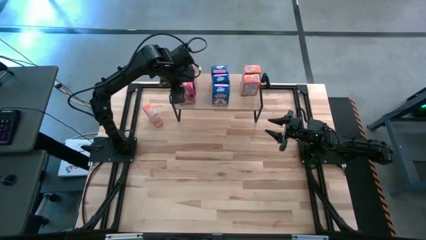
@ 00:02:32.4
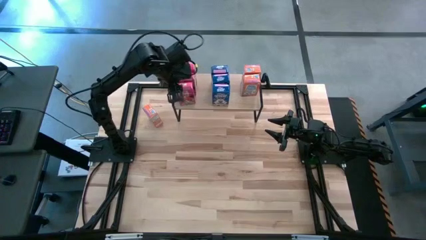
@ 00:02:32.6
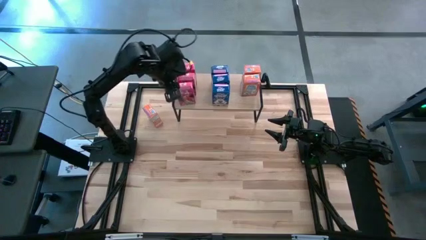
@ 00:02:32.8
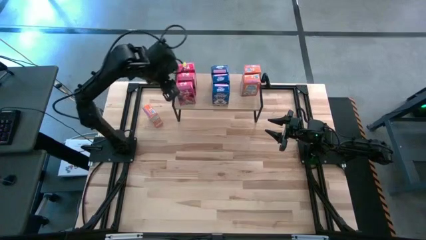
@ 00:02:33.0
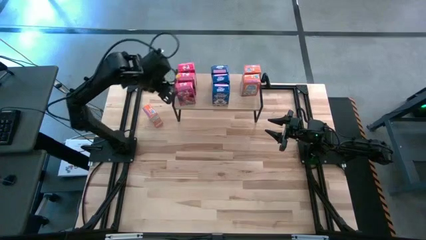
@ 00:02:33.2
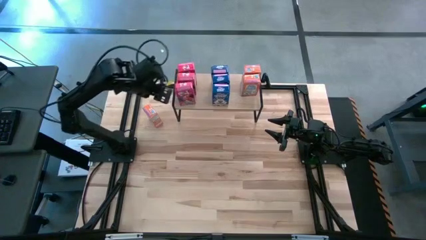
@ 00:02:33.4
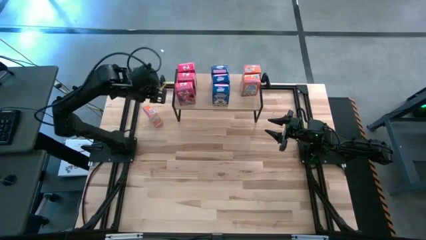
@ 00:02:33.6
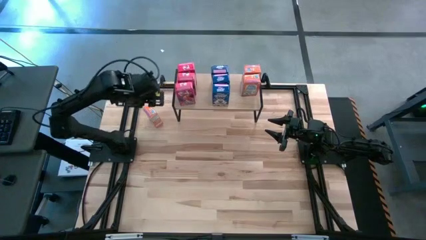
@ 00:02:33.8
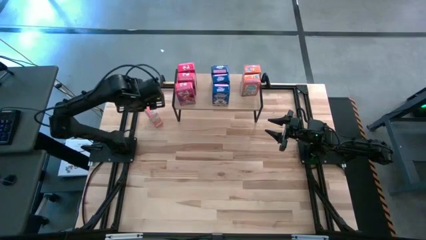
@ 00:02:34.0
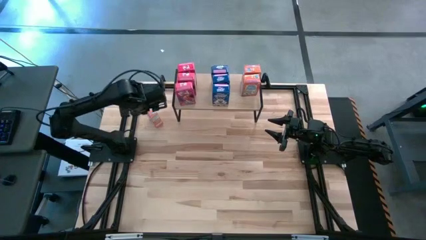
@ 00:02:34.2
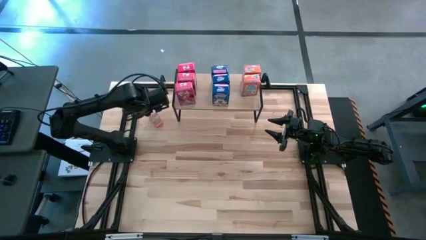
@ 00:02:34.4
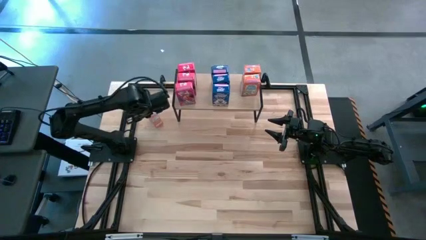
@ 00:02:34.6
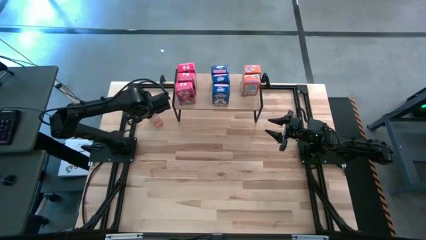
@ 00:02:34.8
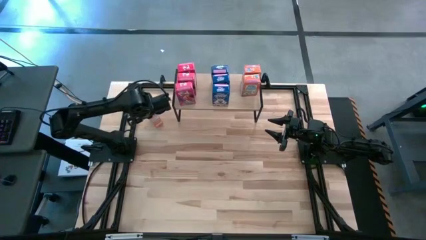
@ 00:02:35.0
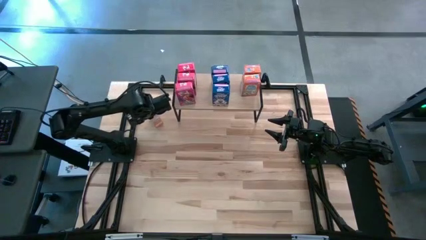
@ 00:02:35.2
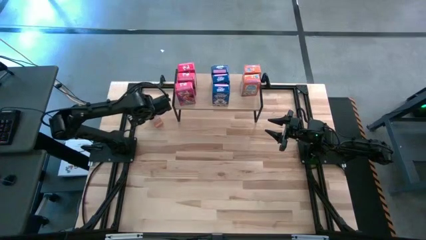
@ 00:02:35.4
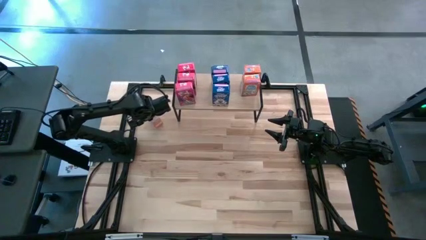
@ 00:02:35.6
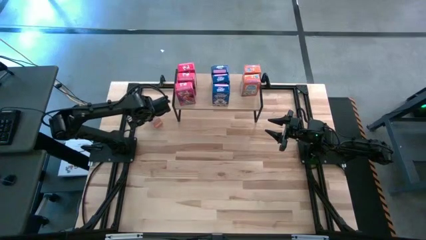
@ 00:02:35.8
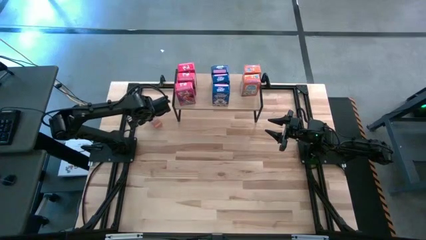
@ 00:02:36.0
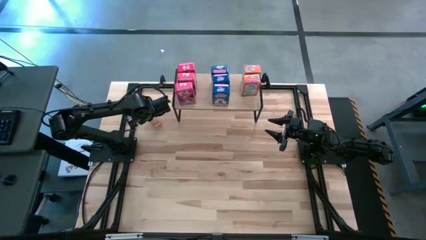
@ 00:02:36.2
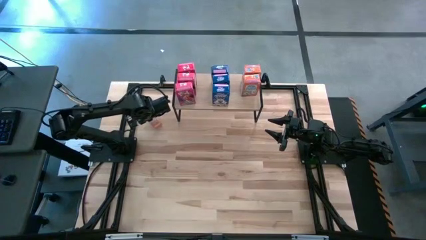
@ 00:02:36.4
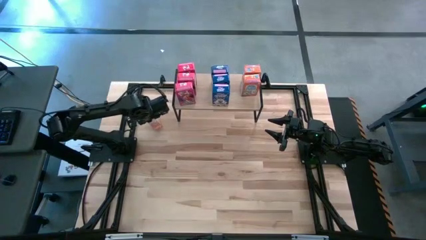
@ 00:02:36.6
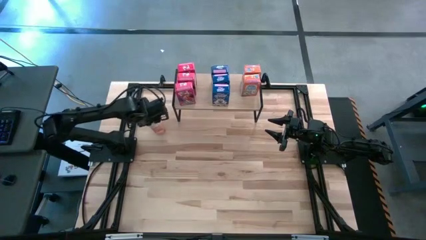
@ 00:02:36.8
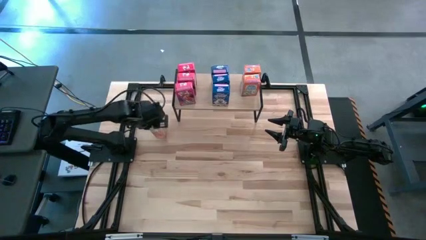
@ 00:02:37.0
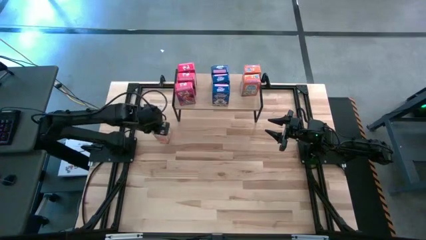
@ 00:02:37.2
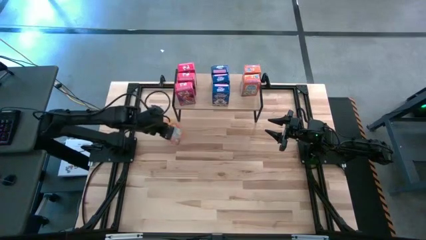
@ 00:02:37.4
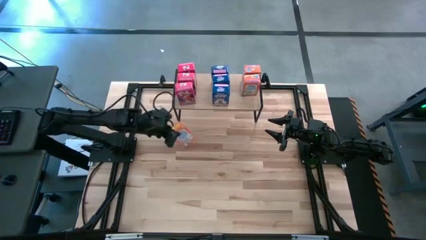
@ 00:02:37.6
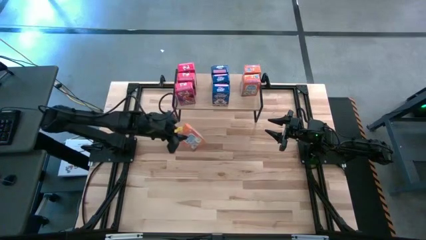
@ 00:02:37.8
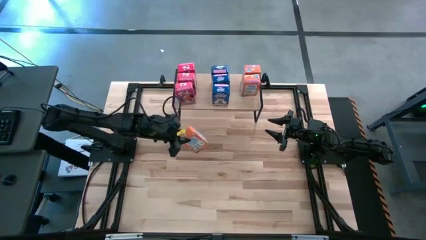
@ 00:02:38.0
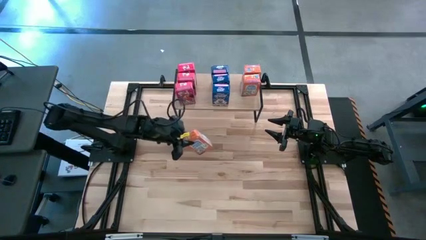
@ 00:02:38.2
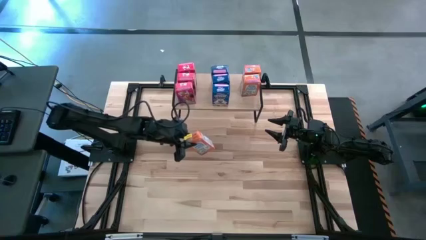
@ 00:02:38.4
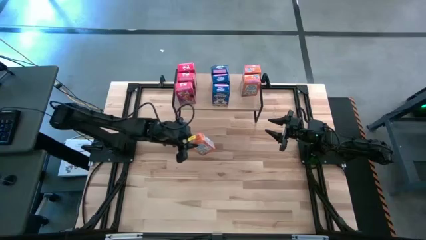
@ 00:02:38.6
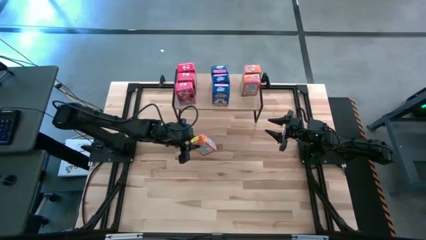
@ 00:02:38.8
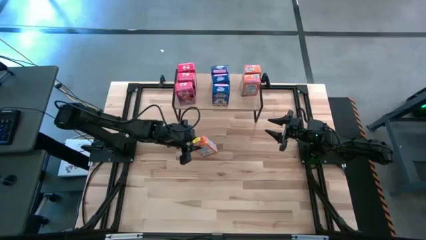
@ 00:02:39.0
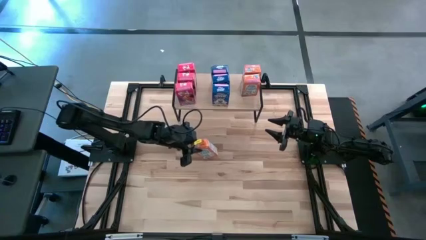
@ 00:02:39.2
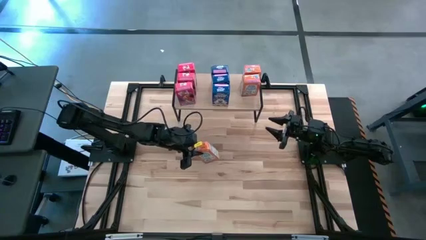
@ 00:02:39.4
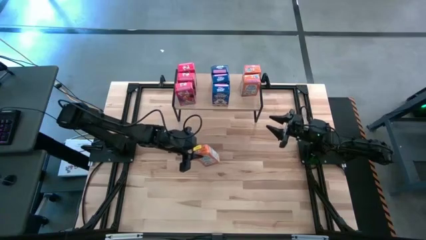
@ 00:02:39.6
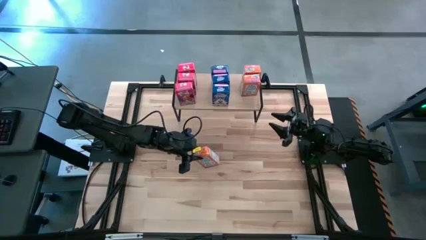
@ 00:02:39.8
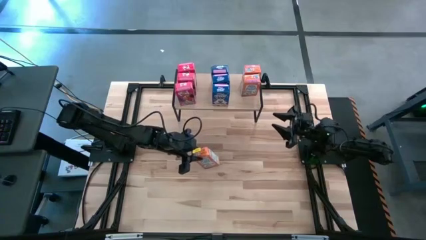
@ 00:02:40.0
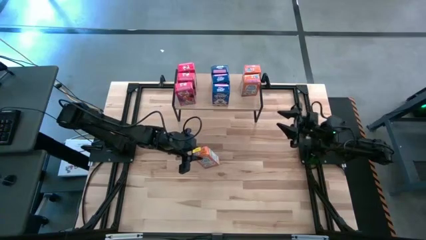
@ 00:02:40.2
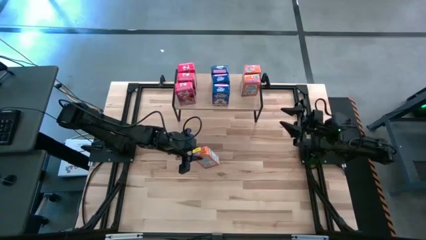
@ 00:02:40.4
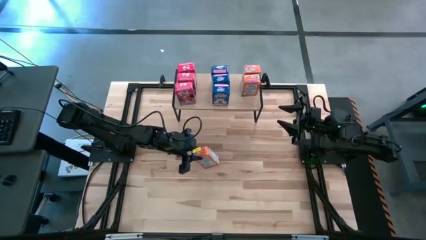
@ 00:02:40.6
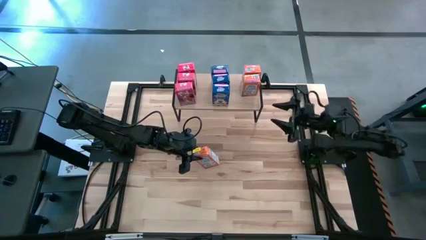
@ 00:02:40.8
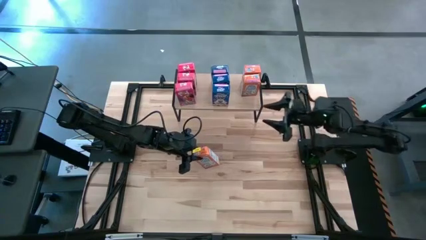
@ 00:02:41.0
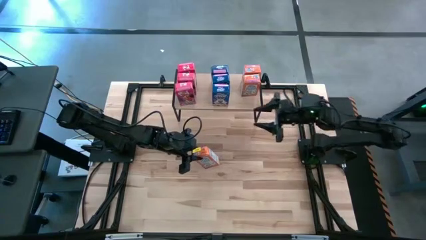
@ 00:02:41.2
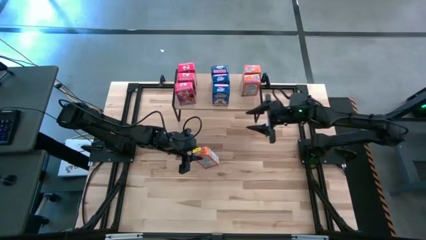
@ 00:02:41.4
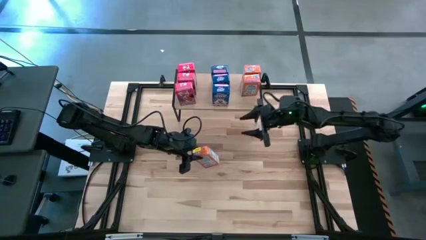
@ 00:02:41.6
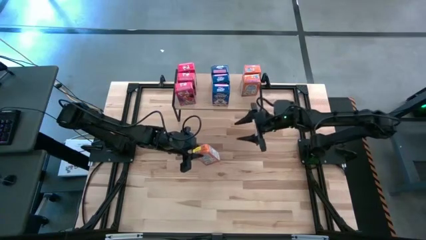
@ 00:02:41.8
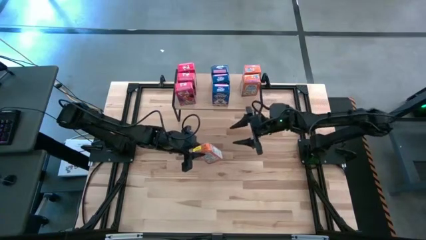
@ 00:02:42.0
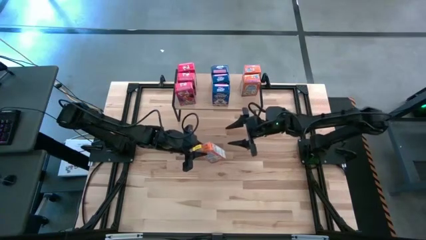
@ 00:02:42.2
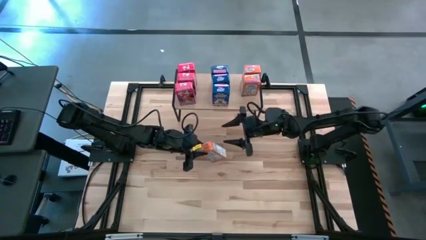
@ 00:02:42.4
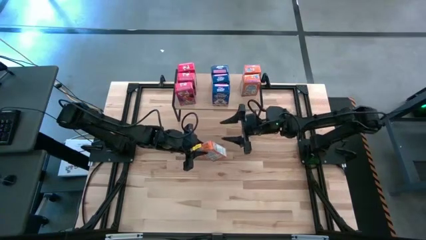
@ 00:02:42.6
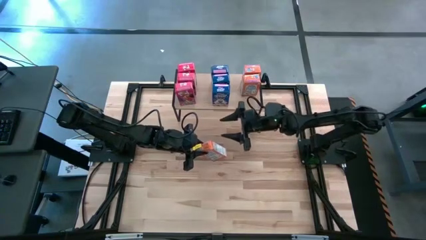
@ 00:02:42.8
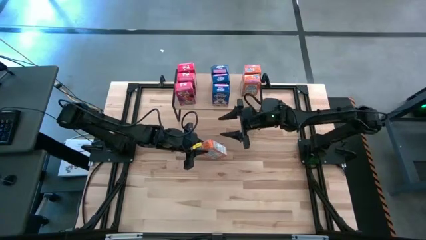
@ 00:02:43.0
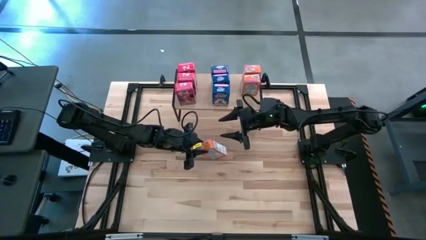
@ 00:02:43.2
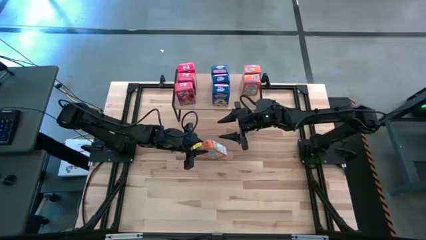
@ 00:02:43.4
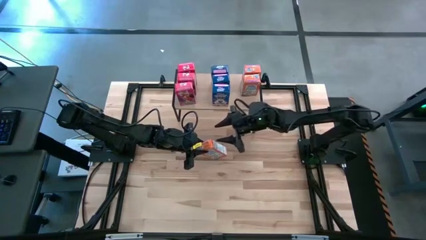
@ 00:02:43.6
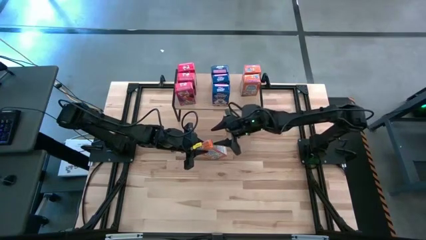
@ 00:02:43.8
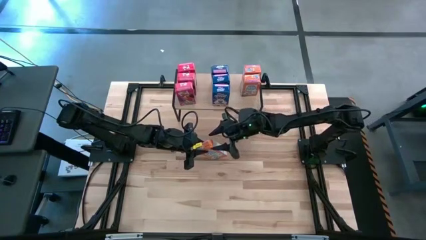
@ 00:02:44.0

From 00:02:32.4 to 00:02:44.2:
Task: Stack cereal on shelf
Put the orange cereal box on the shelf

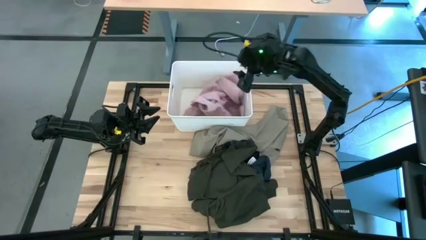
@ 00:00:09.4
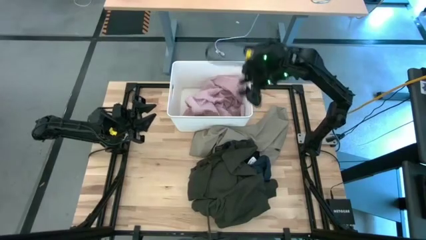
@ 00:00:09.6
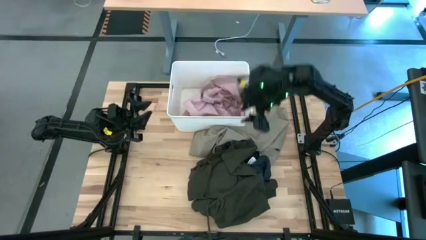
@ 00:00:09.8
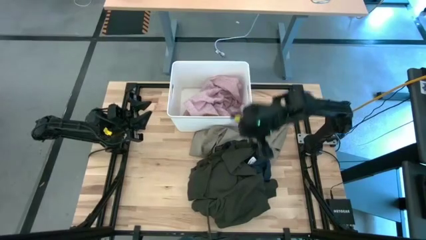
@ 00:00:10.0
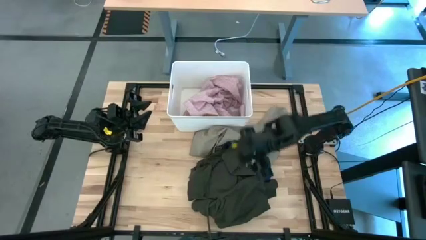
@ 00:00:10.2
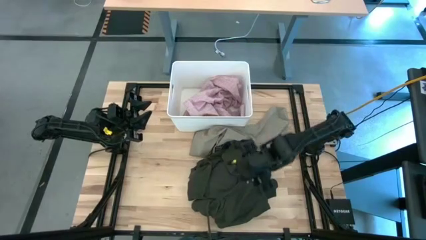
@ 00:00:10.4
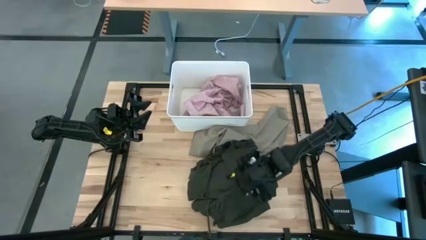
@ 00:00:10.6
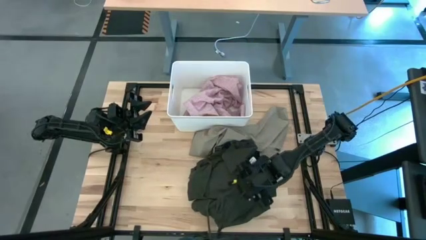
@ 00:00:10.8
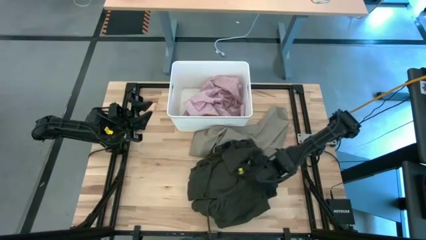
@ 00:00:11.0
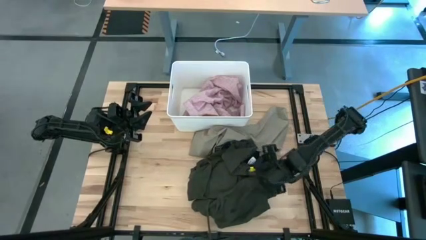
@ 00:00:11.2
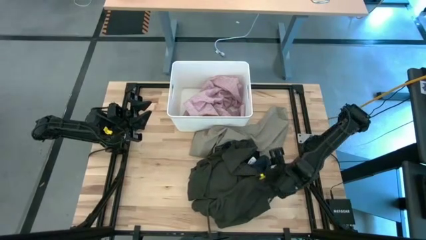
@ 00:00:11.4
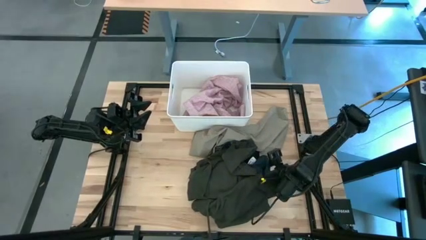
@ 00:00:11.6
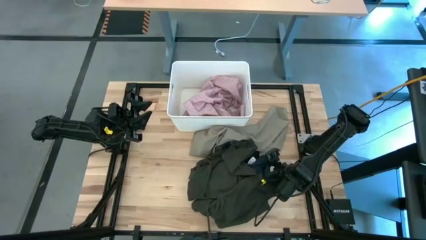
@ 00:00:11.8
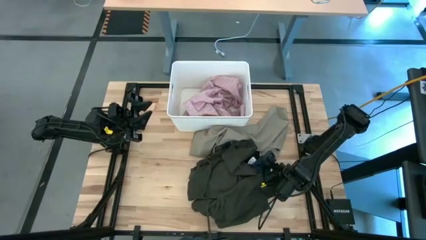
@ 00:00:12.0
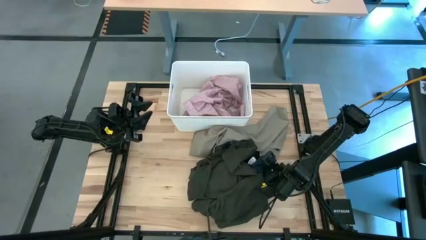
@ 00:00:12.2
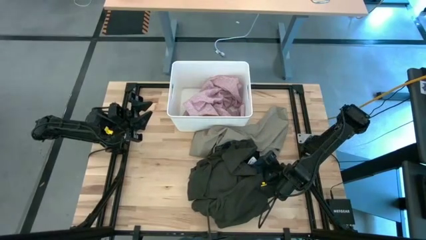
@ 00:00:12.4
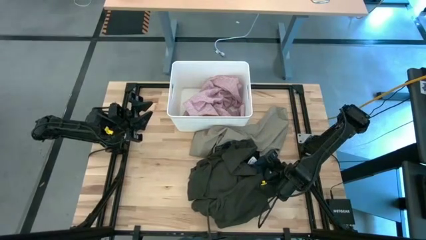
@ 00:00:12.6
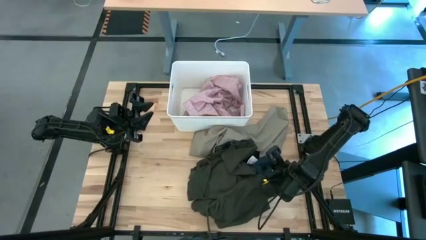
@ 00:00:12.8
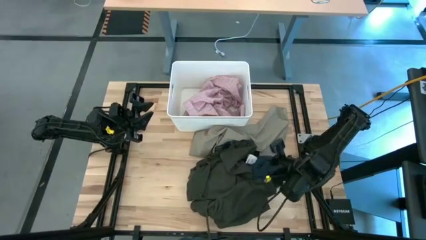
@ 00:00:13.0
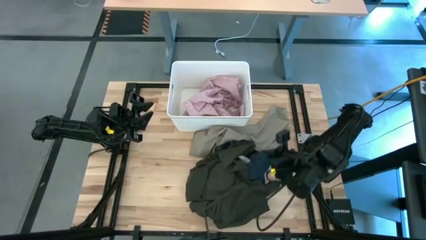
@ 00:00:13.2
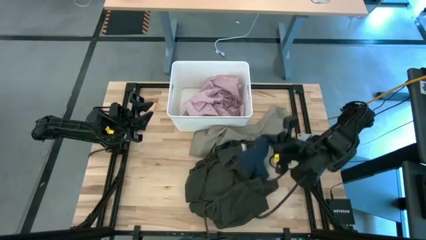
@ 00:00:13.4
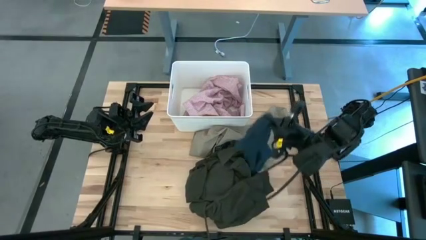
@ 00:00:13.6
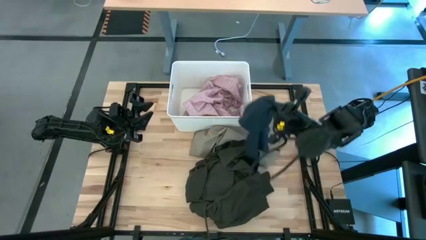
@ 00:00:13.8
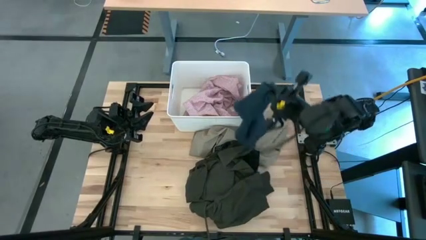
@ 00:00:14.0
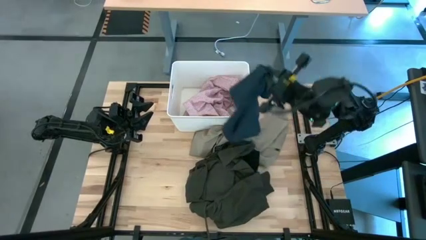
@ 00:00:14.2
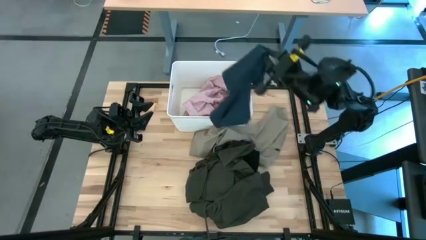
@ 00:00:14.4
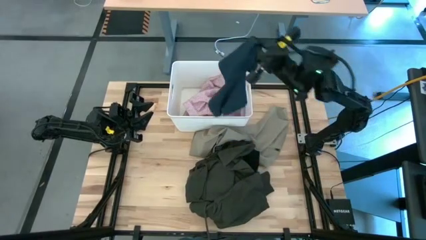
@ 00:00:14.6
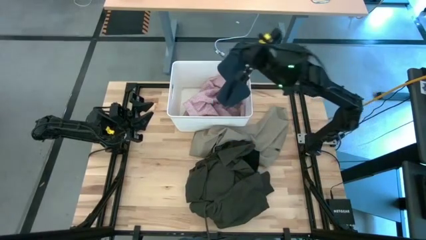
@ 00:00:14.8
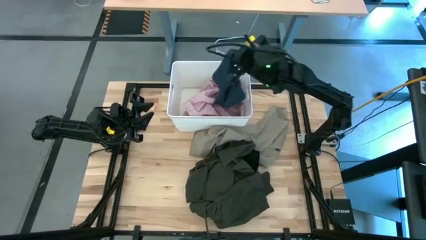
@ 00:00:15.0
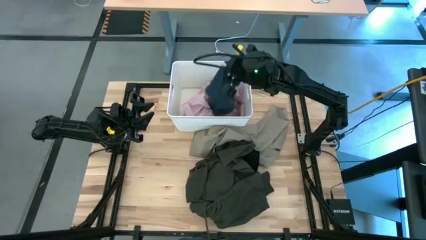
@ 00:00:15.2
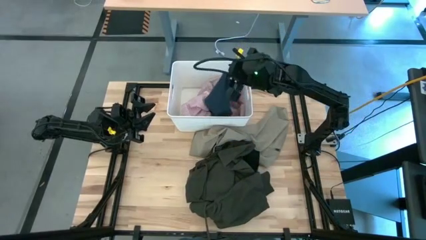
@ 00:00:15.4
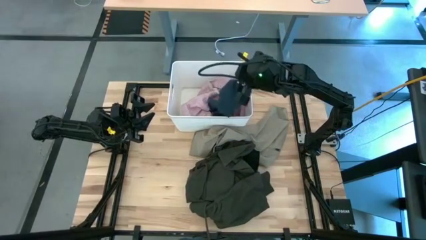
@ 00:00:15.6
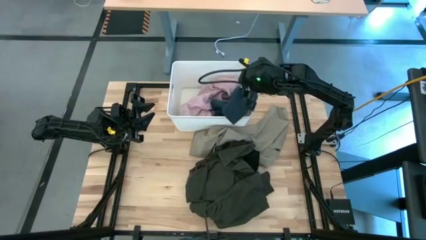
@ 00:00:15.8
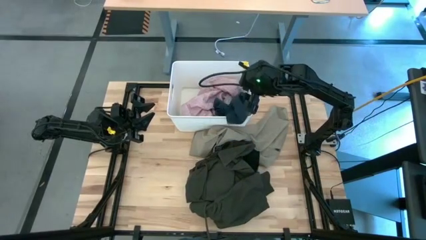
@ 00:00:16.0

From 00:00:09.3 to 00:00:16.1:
Task: Sort clothes
Put the blue towel into the white bin
